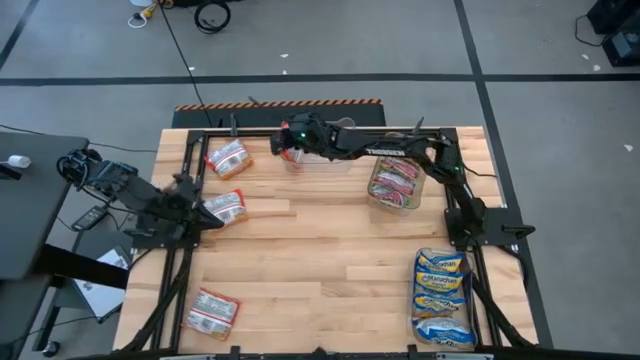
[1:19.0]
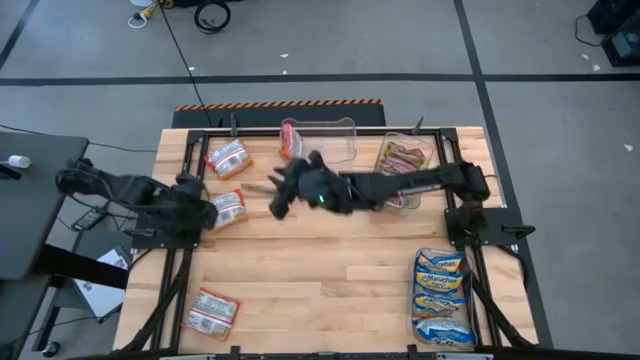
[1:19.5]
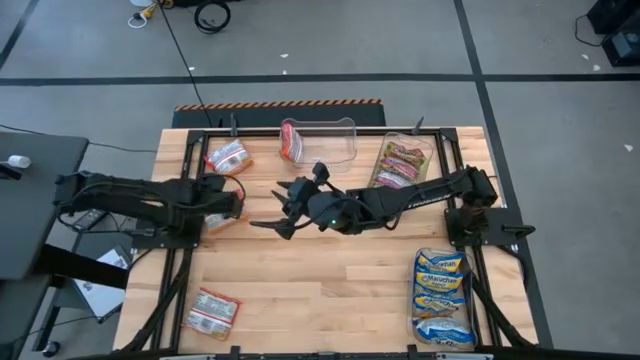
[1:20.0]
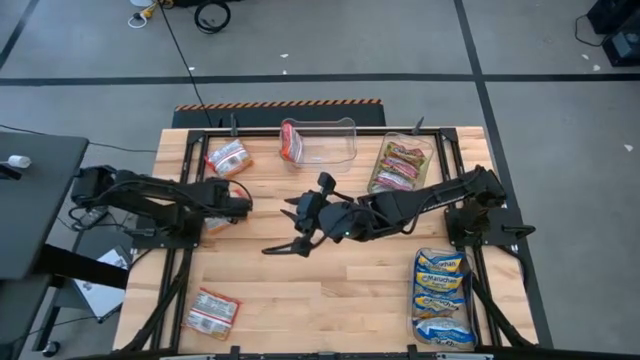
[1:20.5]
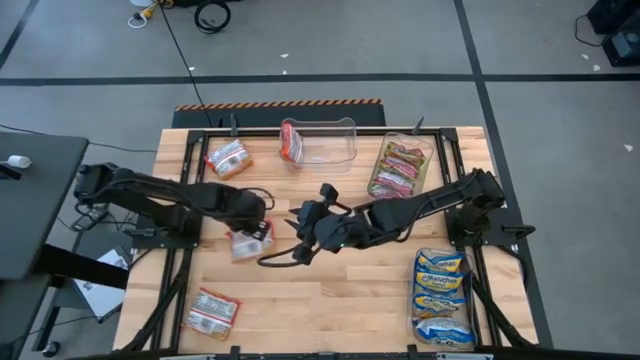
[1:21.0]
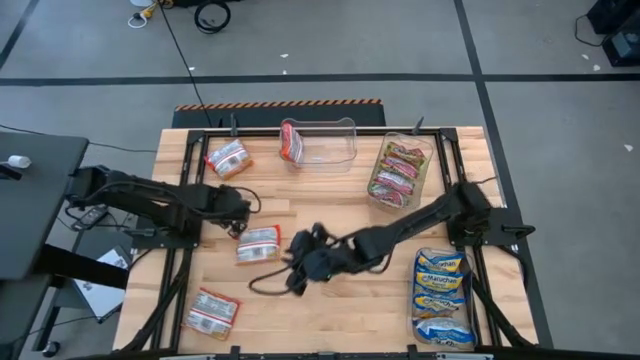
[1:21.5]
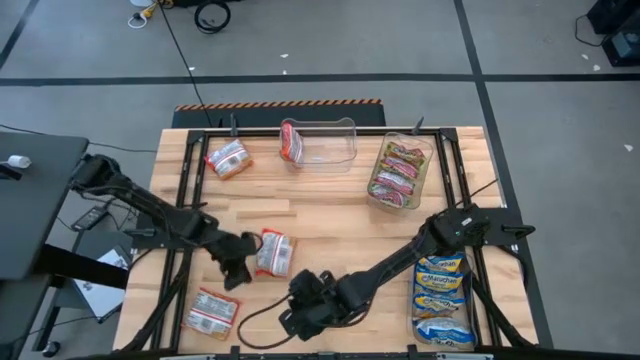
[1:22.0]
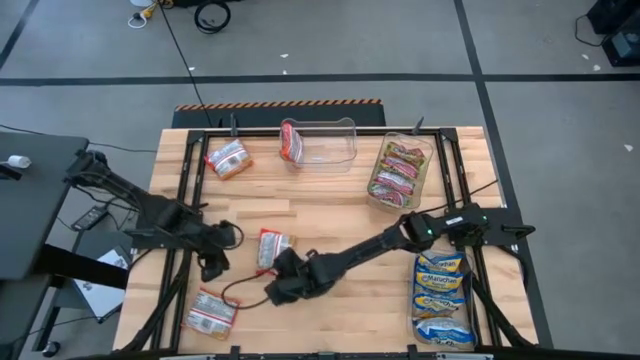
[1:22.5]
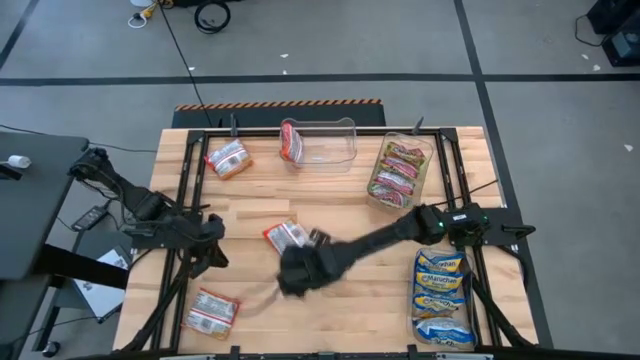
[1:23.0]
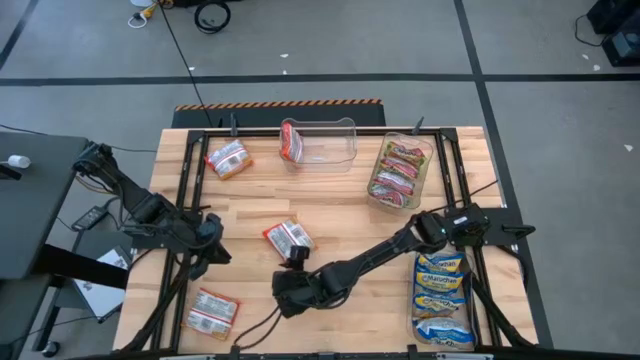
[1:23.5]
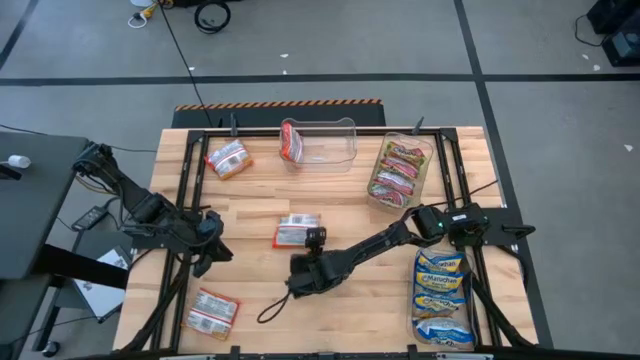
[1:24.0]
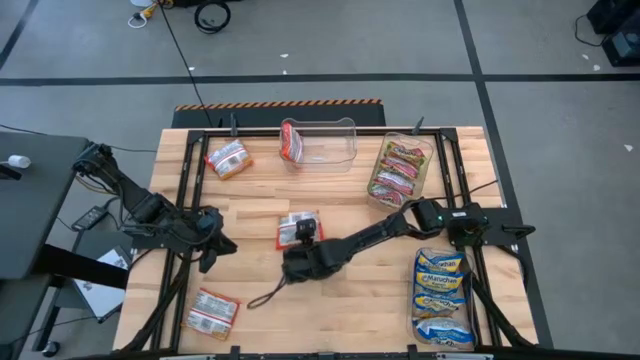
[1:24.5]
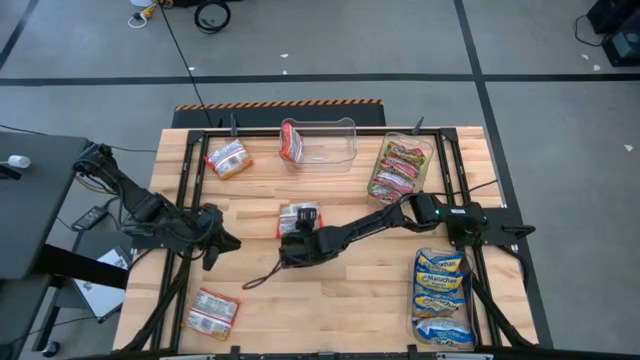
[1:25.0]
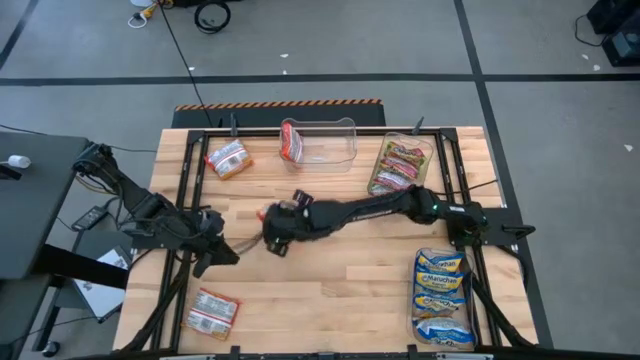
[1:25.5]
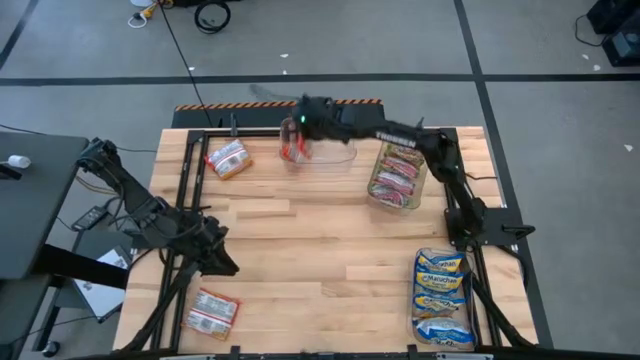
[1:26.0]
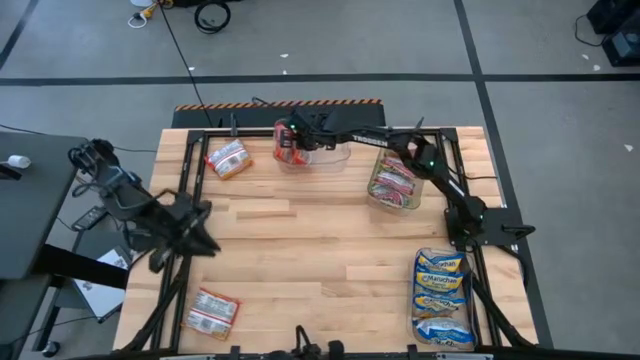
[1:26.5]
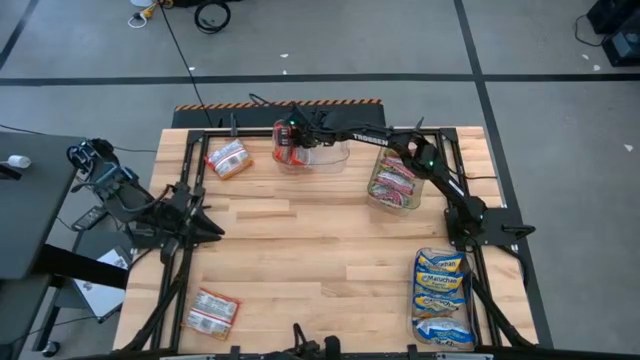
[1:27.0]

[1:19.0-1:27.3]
Task: Sort Maruchan noodles
Put the middle orange noodle pack into the top left transparent bin

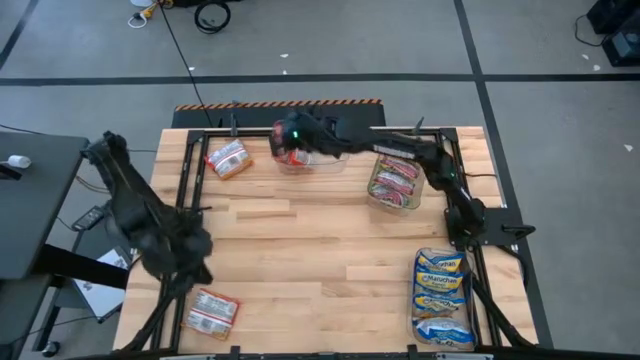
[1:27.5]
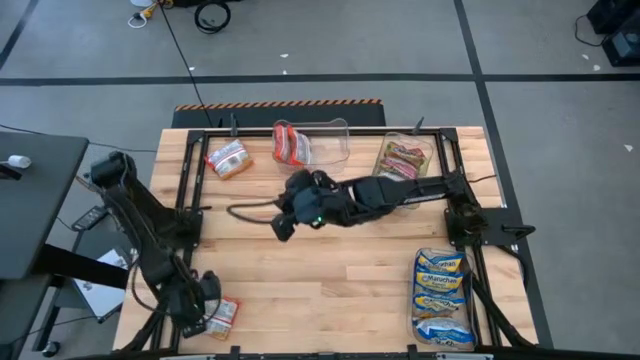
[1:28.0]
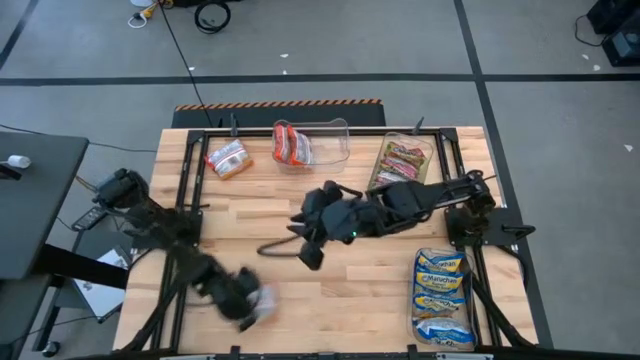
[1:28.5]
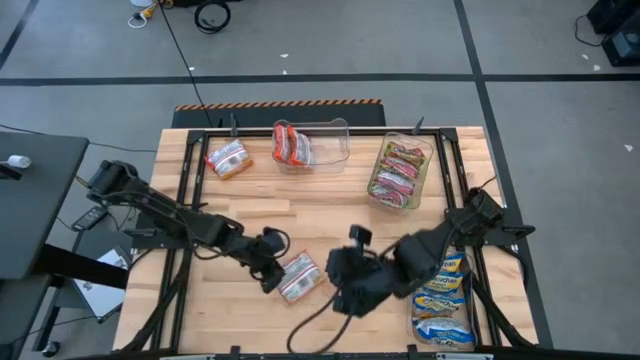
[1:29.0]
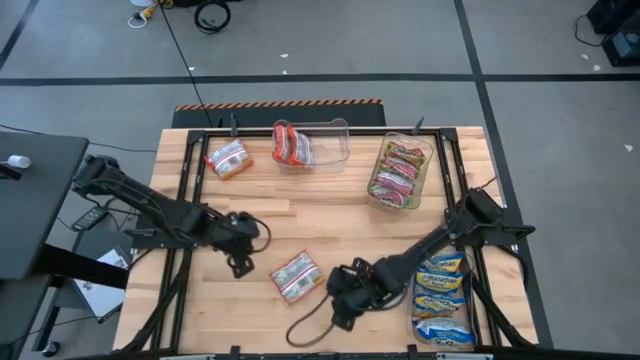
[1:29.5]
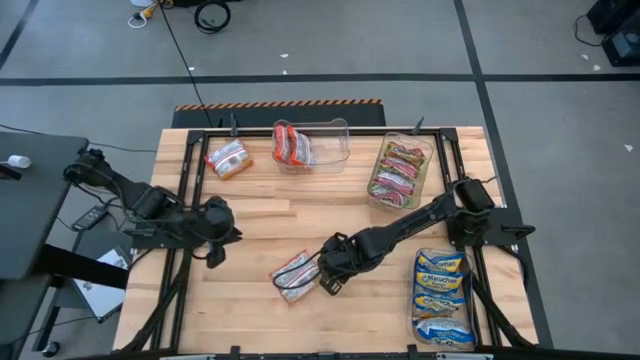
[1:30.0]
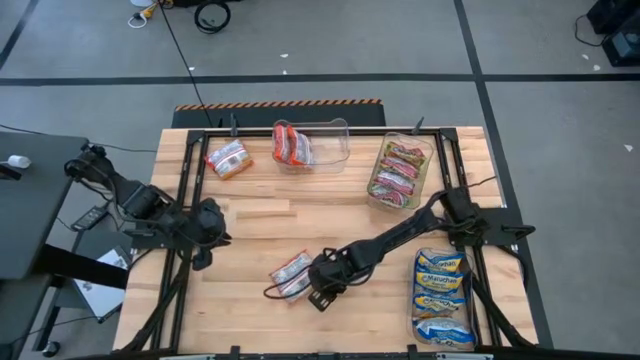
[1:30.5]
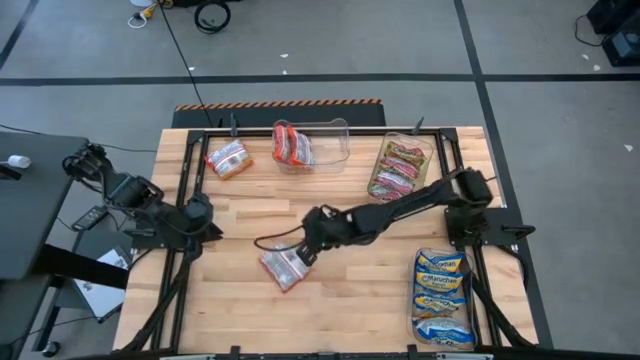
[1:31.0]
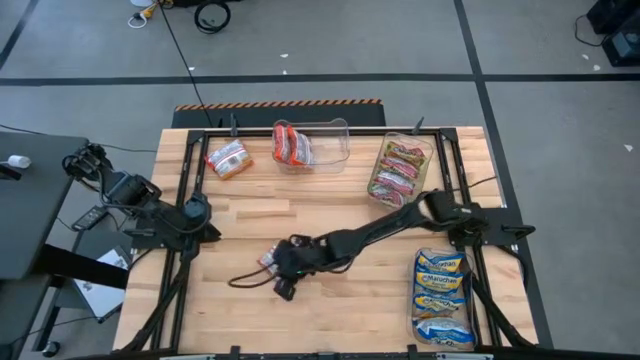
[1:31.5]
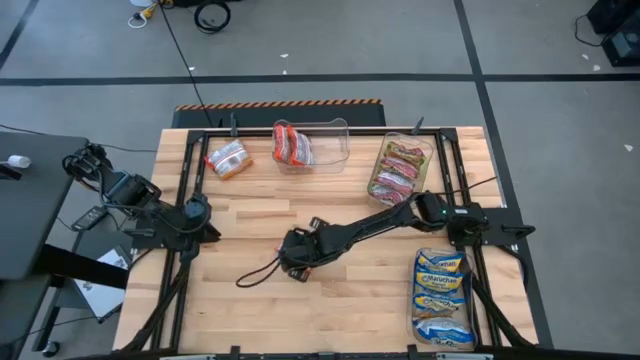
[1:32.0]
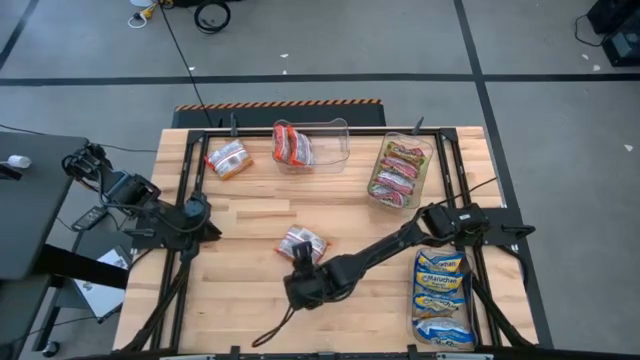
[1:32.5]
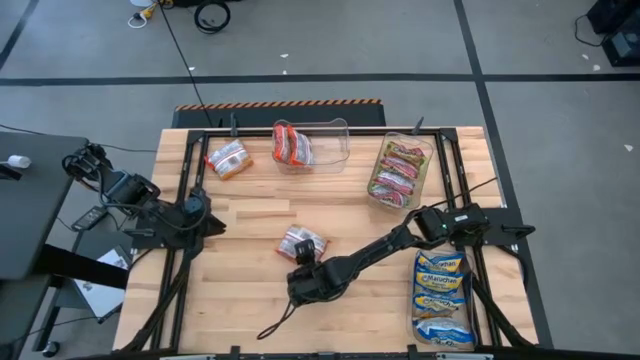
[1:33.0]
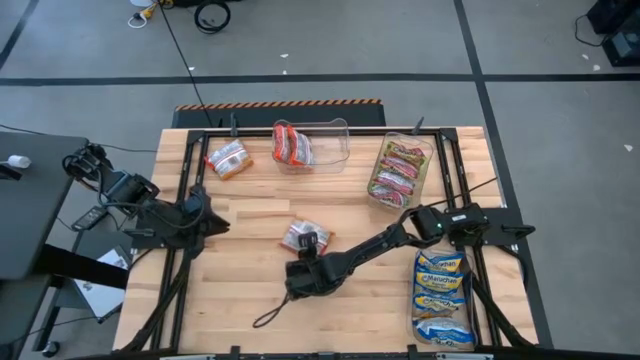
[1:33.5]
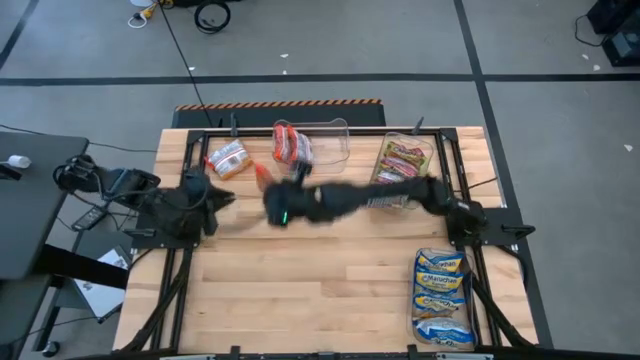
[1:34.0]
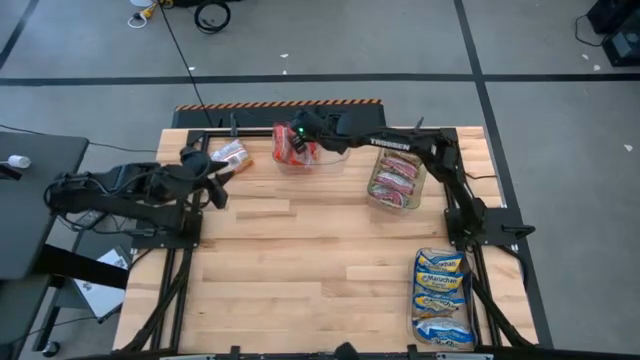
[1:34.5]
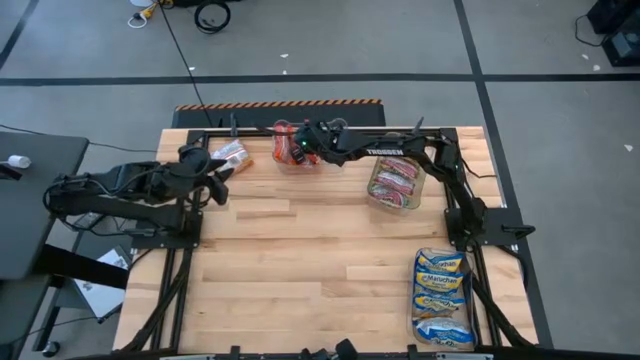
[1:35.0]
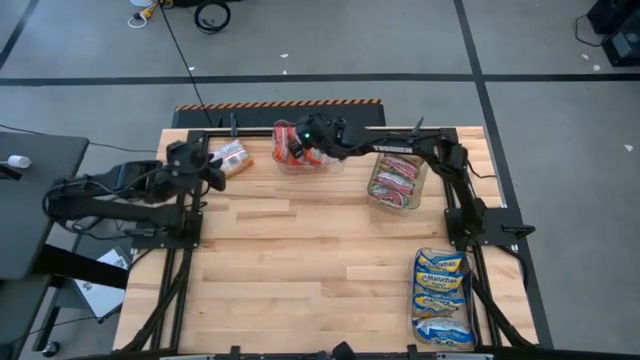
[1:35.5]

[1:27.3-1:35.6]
Put the bottom orange noodle pack into the top left transparent bin

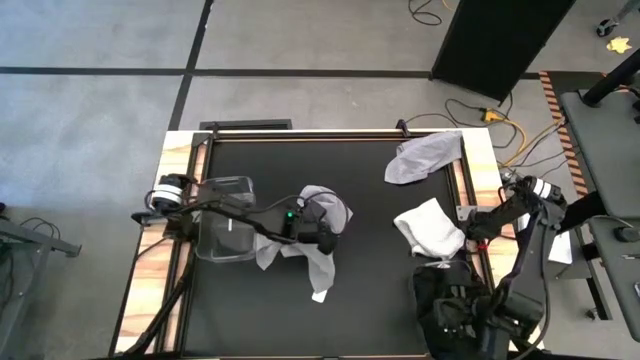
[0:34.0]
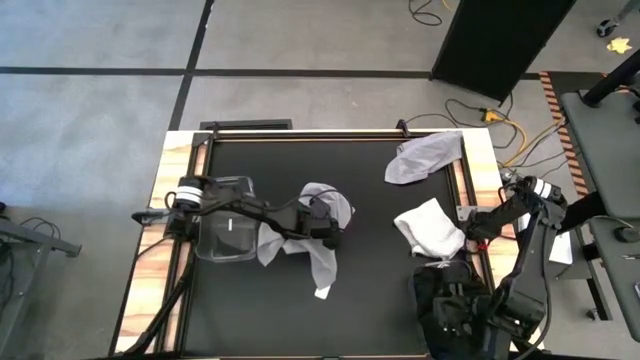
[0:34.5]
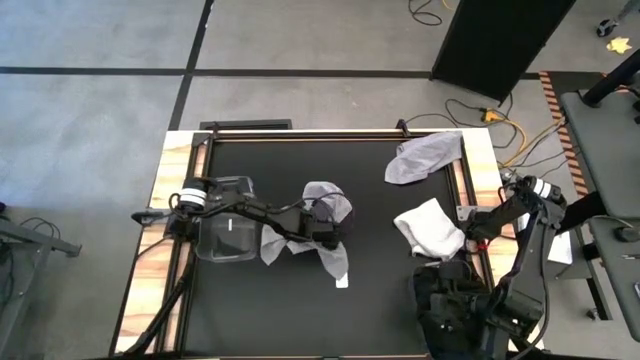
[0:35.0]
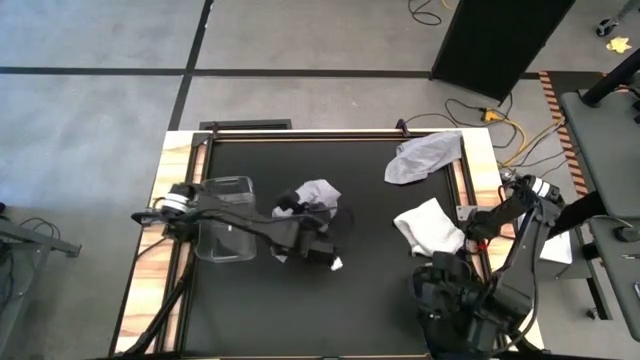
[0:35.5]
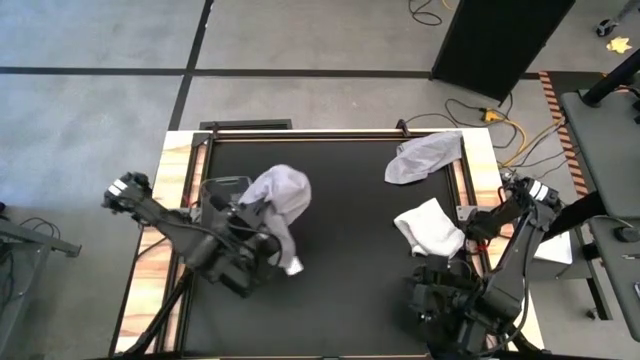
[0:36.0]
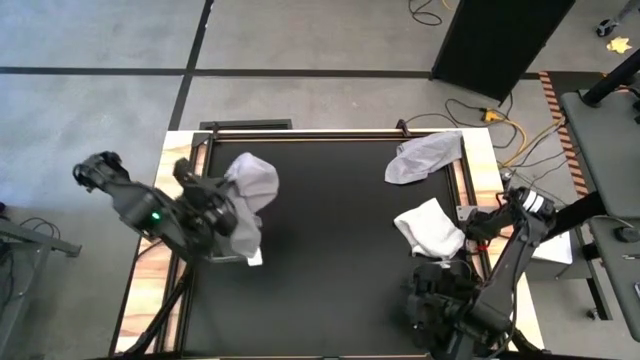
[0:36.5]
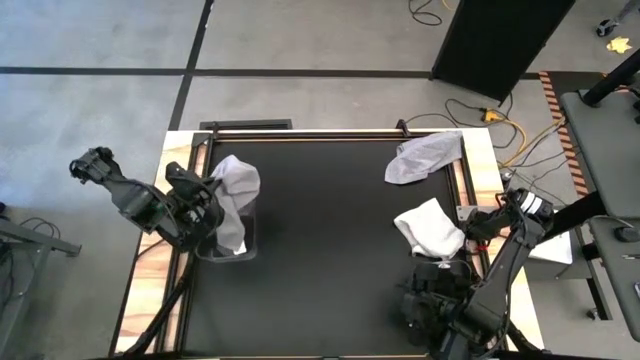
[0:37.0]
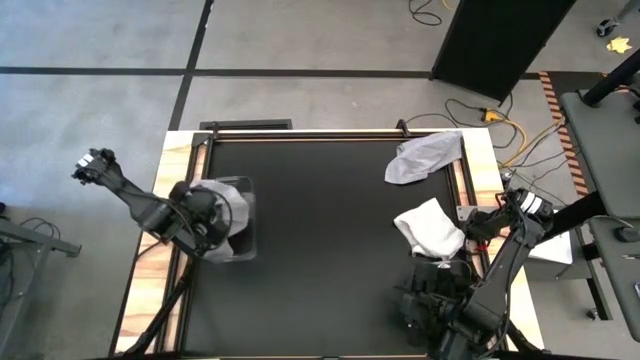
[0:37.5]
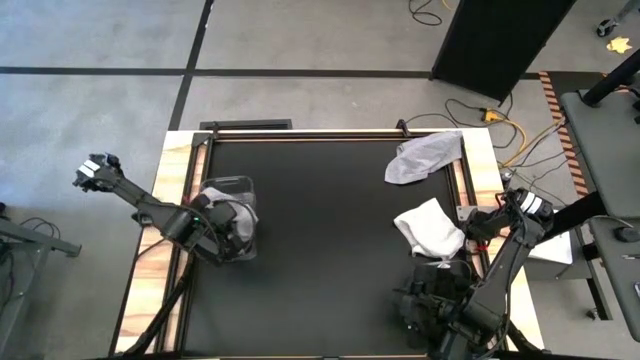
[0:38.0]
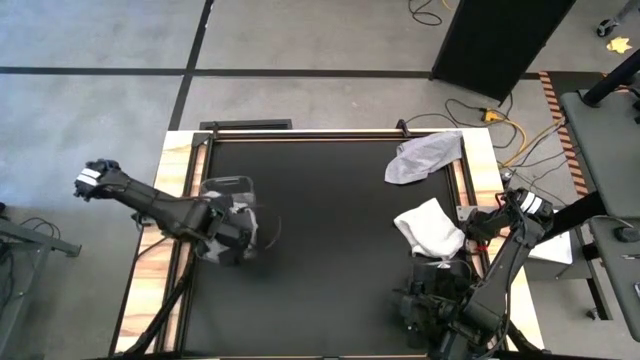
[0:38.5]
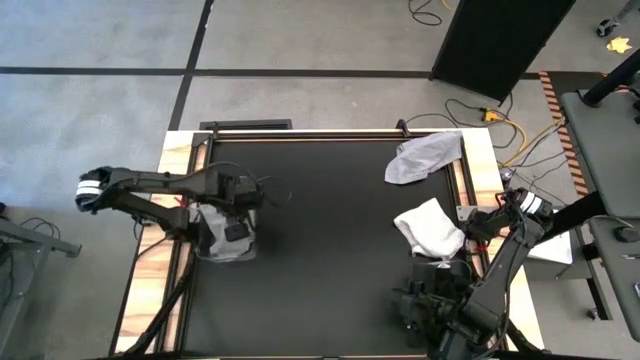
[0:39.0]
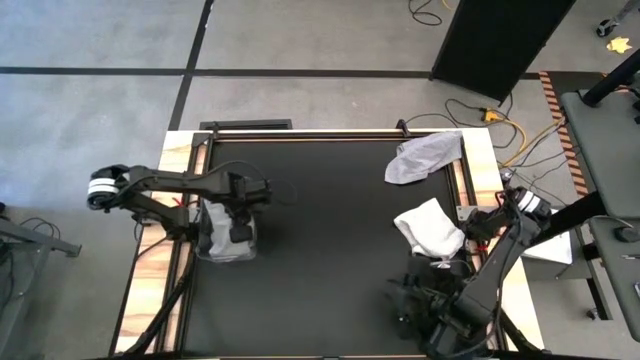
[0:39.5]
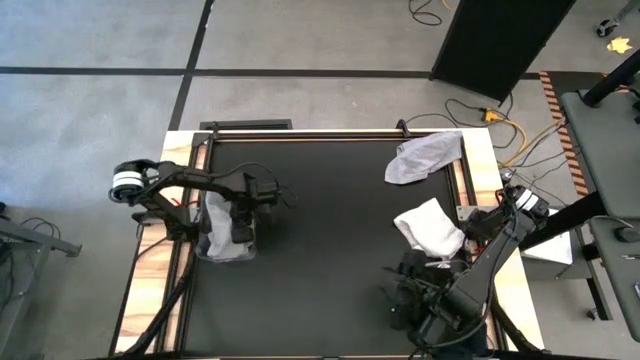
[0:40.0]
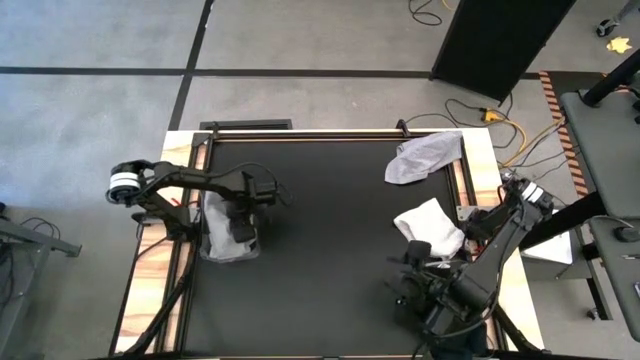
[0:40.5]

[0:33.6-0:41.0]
Task: Sort towels by color in basket
Put the bottom gray towel into the top transparent bin
